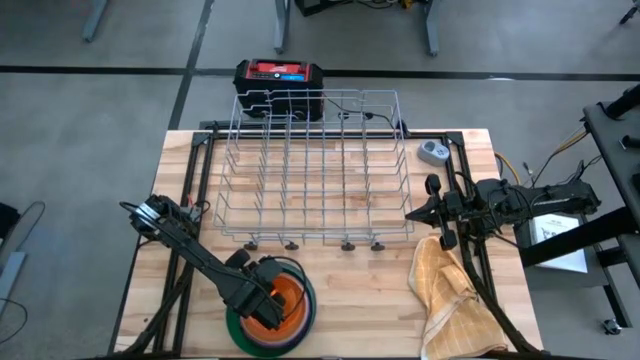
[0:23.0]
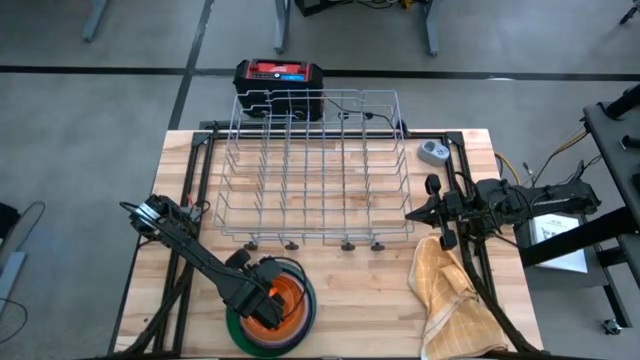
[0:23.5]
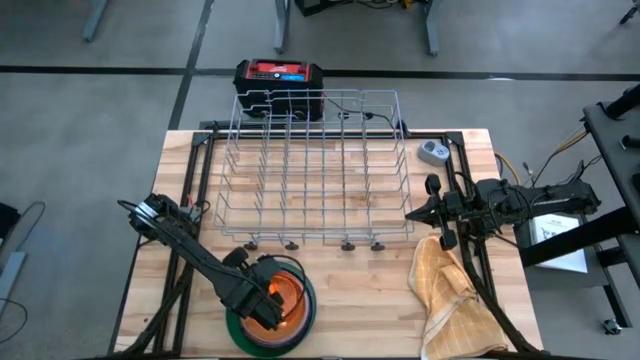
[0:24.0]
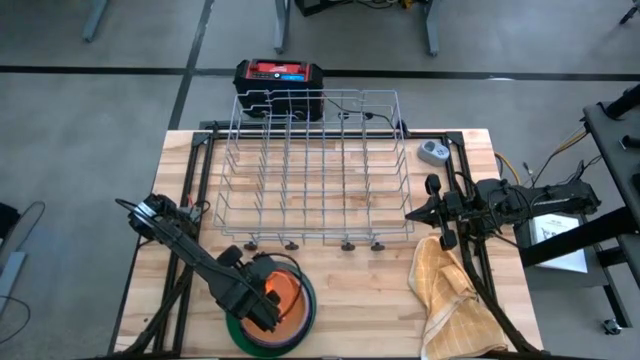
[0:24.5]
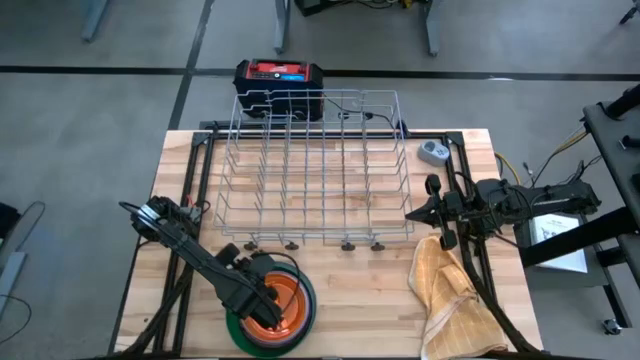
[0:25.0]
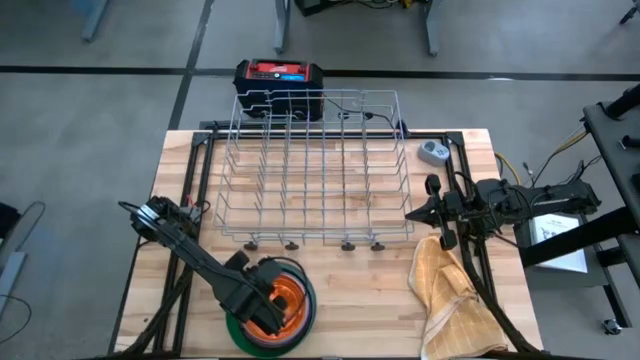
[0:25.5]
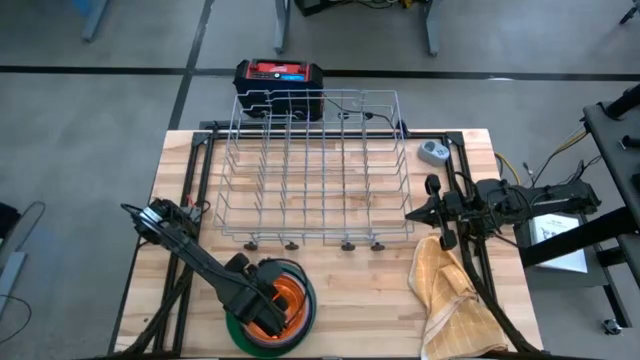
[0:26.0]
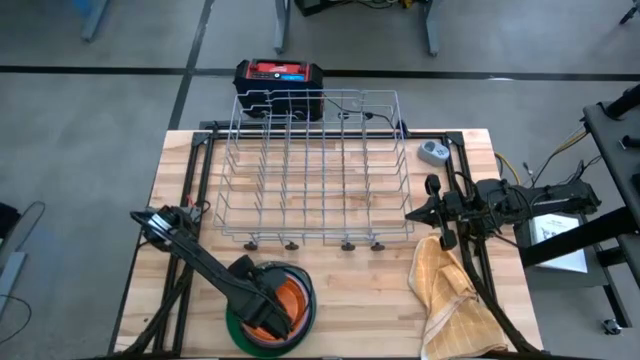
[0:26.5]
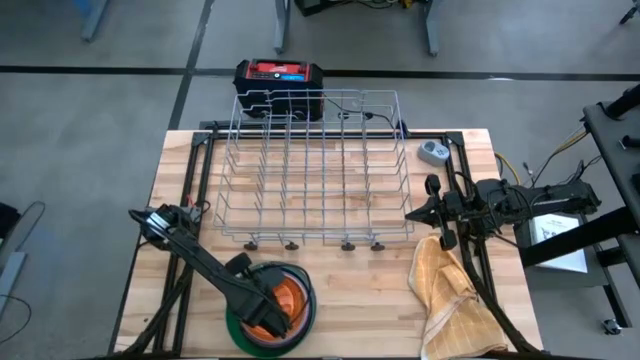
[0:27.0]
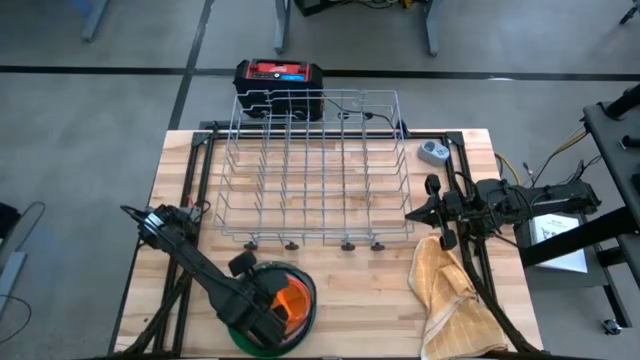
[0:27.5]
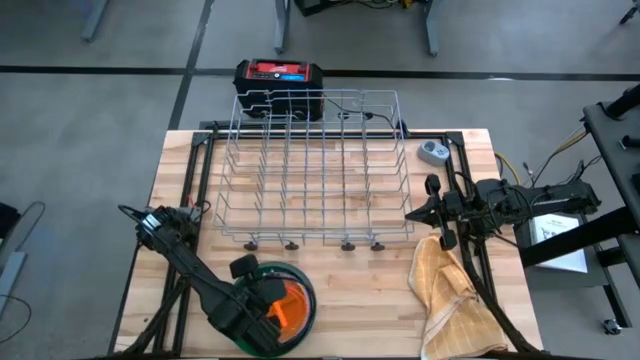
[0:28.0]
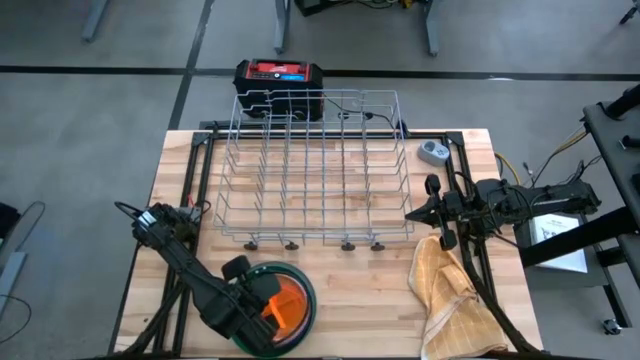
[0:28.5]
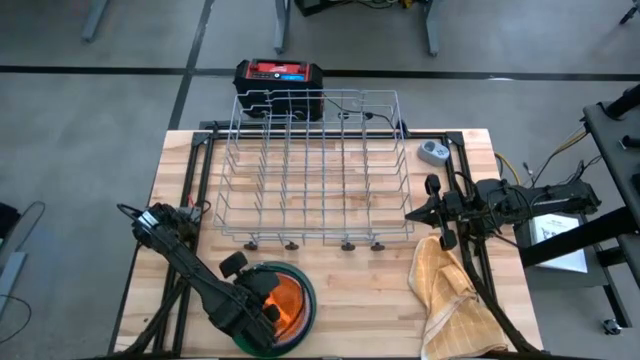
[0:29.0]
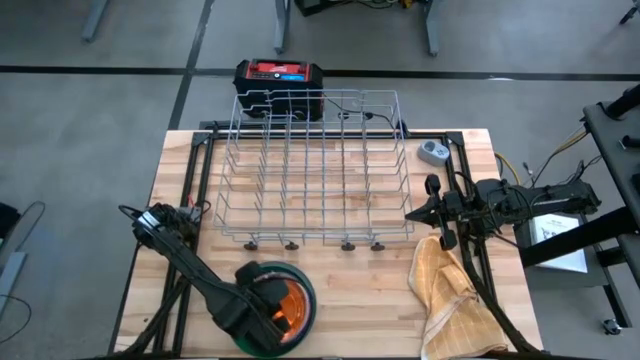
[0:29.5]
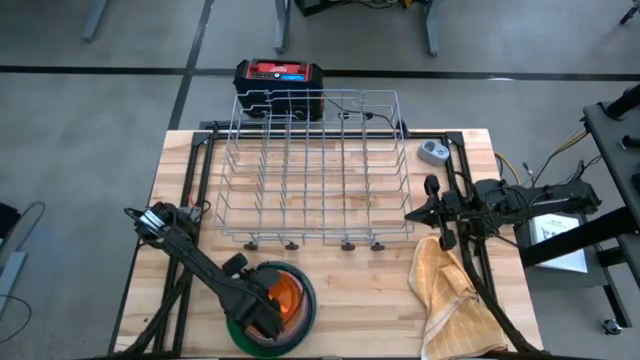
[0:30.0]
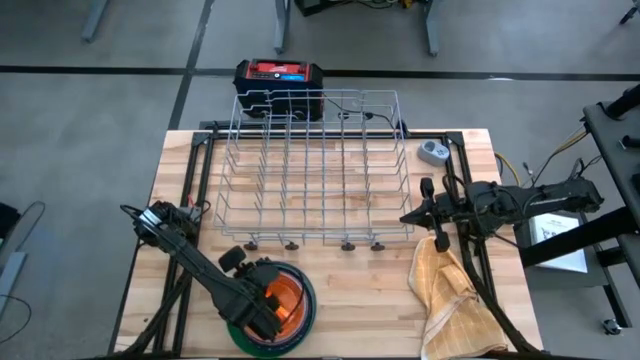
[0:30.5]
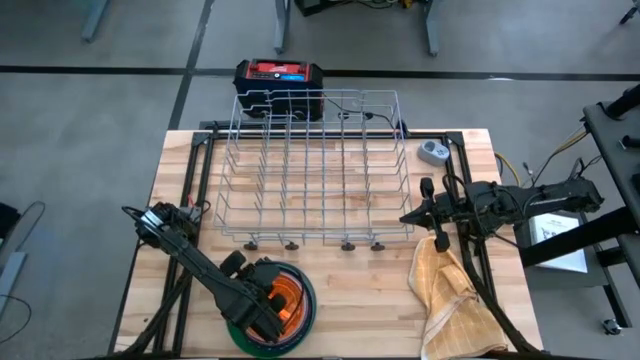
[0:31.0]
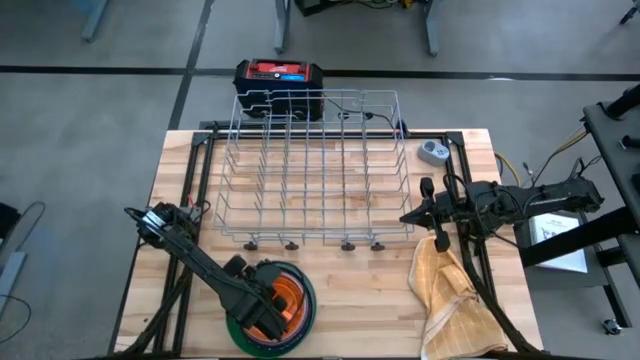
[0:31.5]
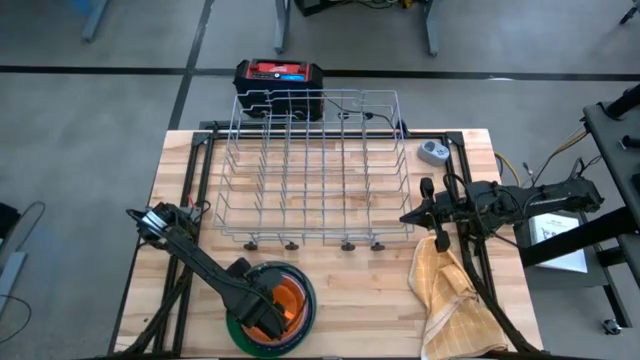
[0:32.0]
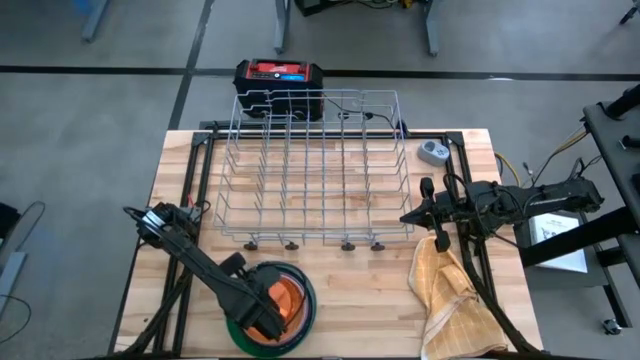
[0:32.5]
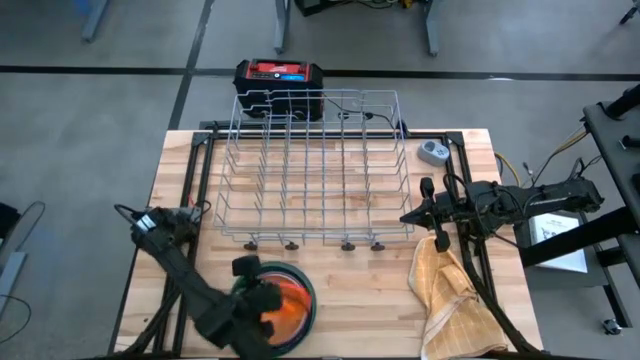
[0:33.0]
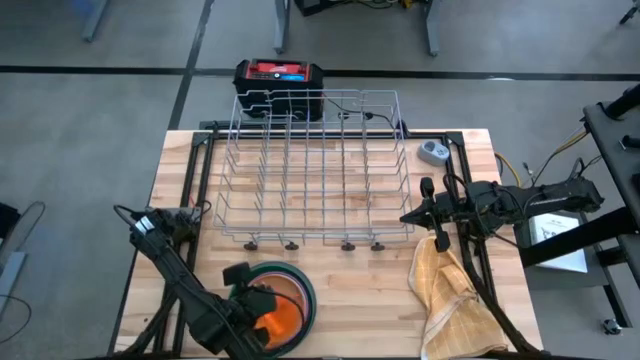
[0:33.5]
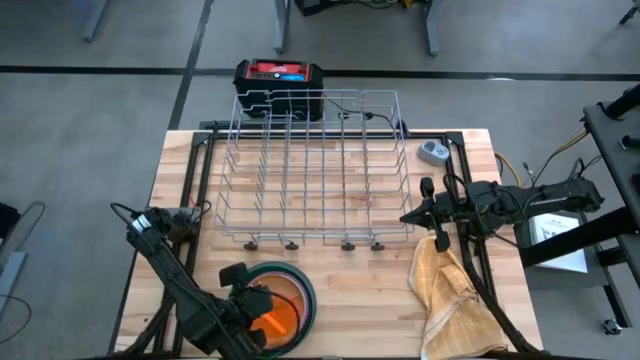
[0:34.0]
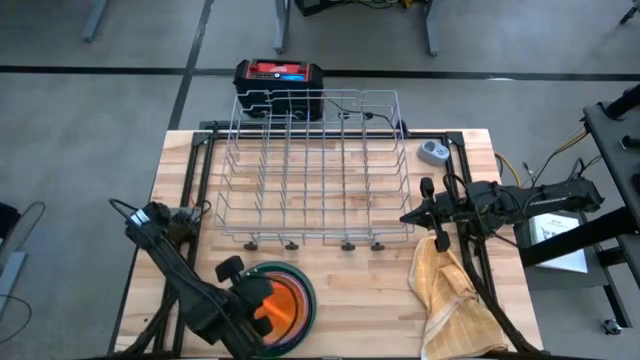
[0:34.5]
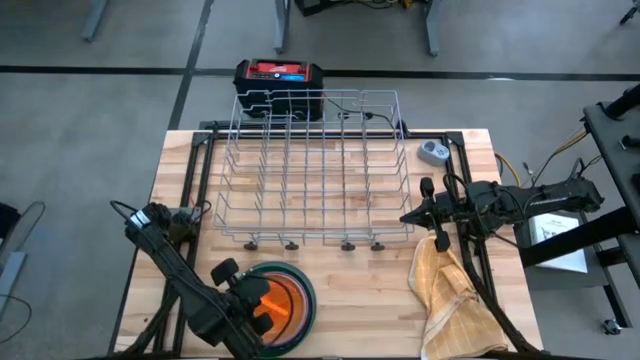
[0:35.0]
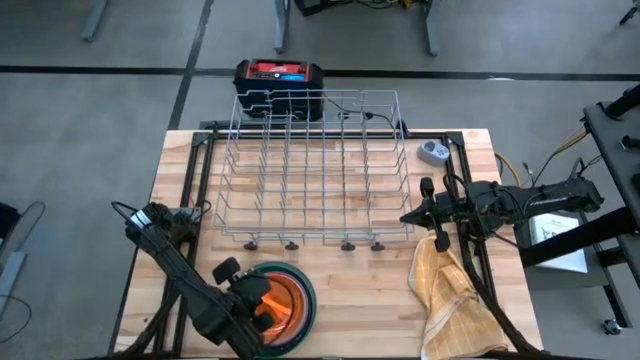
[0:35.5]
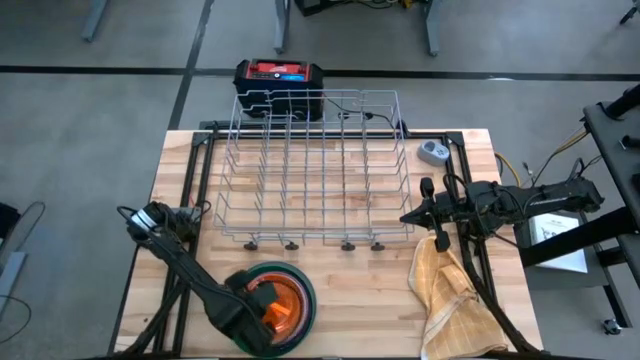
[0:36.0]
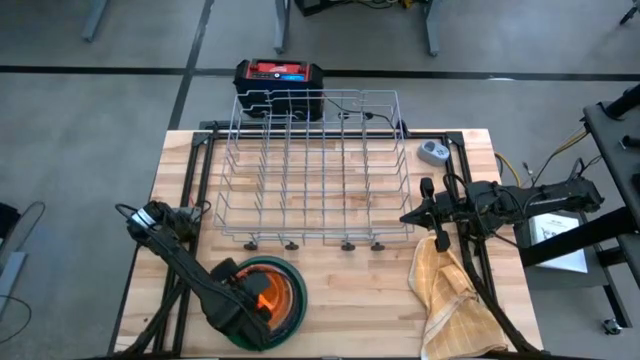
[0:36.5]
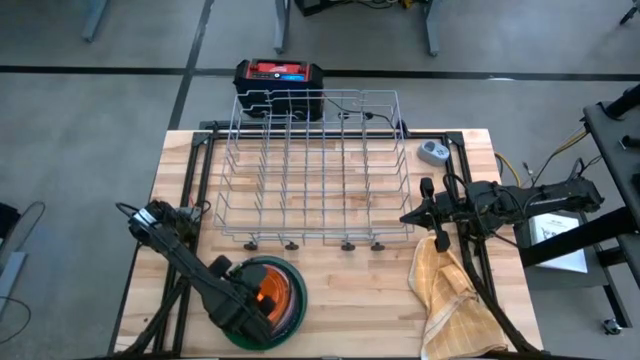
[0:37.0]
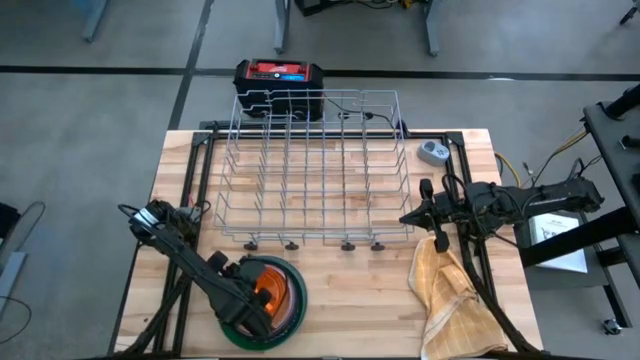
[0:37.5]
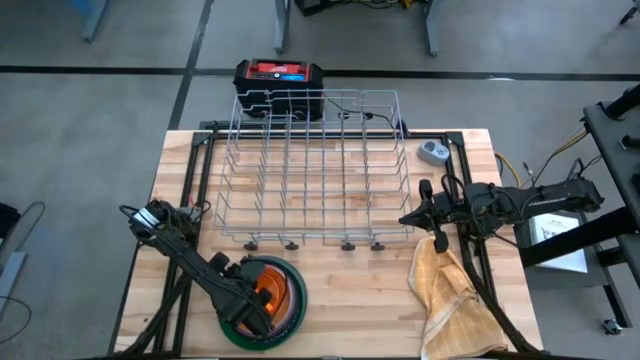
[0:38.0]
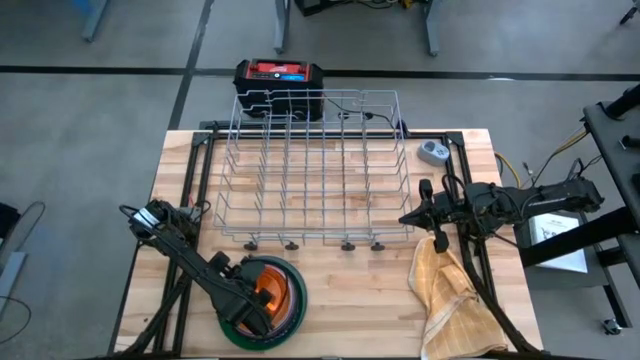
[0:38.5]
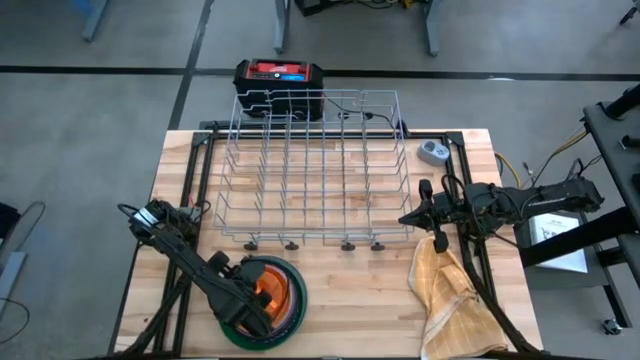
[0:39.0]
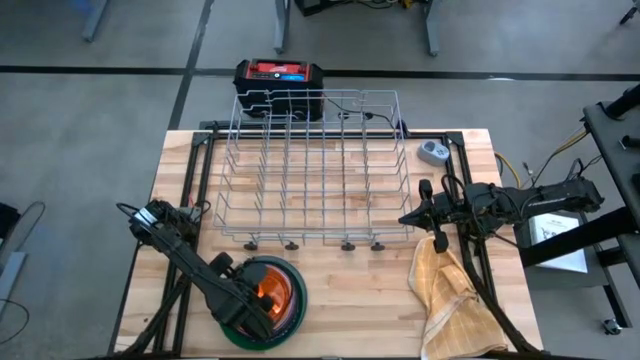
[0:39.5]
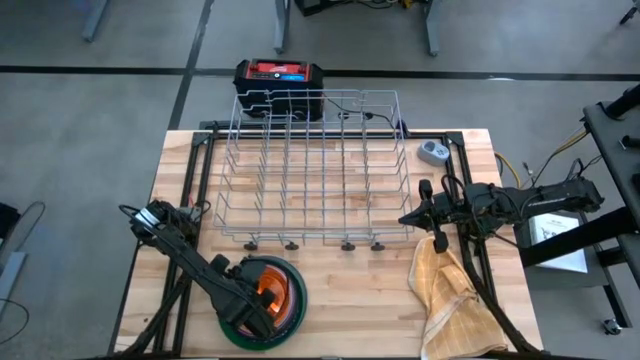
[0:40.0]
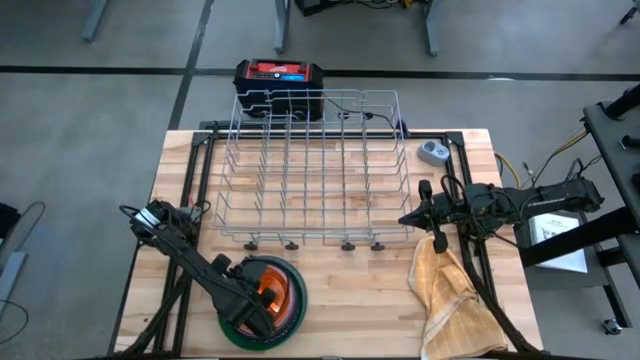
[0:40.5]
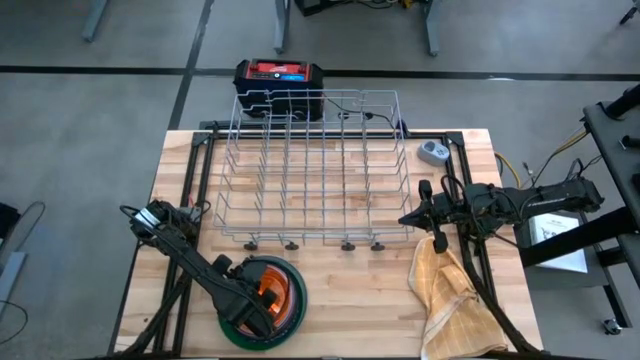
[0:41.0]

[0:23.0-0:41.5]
Task: Sort dishes
Put the transparent orange plate into the dish rack
